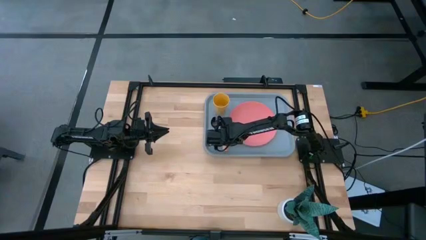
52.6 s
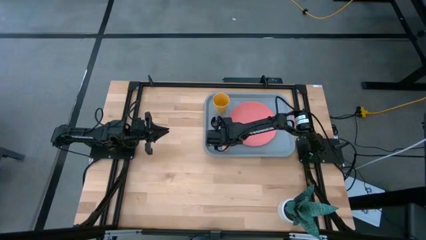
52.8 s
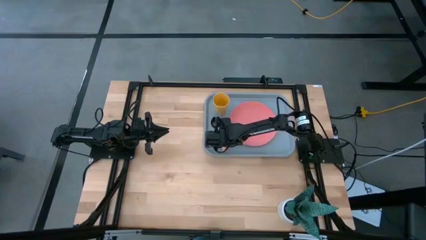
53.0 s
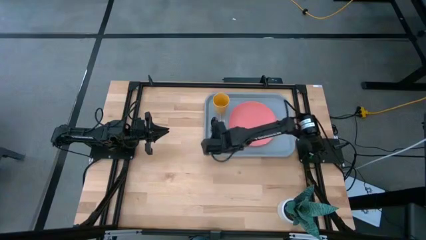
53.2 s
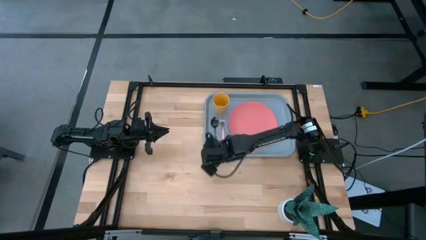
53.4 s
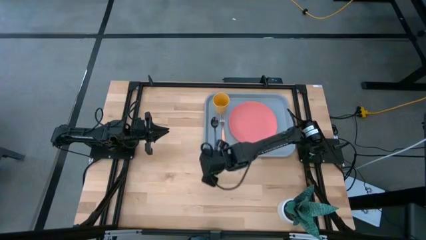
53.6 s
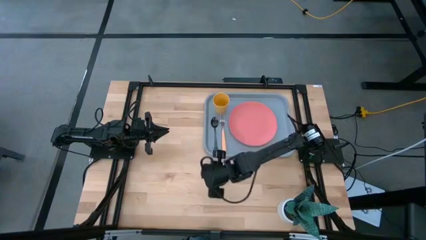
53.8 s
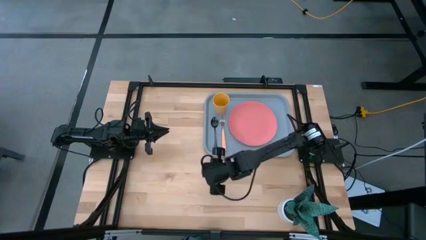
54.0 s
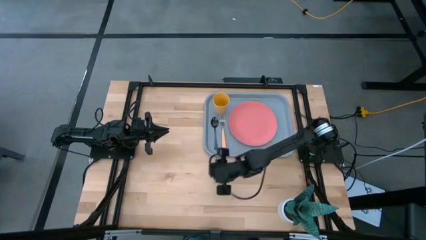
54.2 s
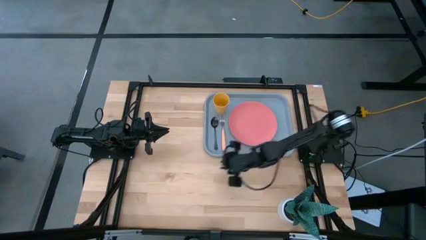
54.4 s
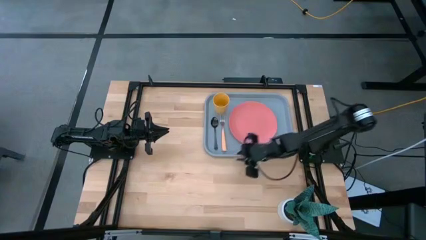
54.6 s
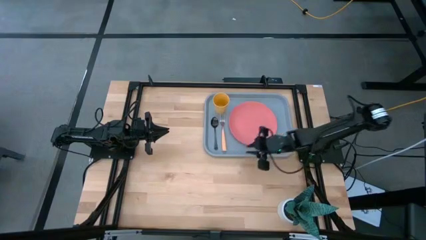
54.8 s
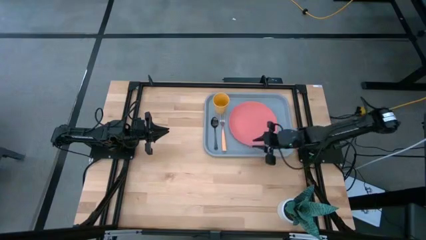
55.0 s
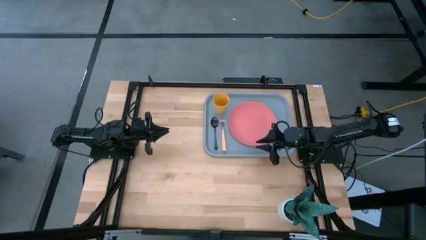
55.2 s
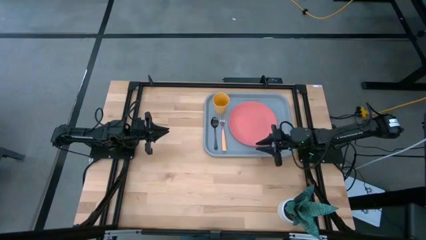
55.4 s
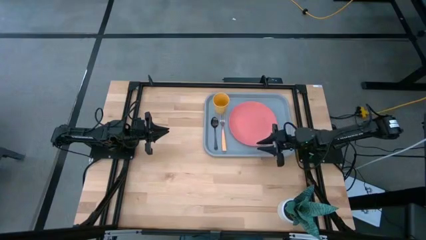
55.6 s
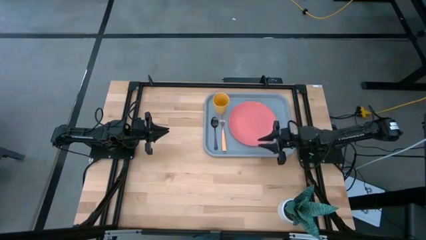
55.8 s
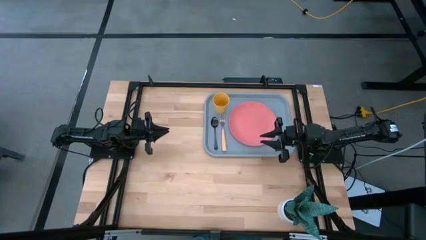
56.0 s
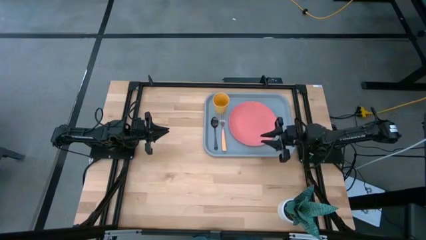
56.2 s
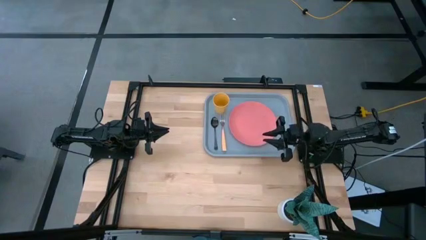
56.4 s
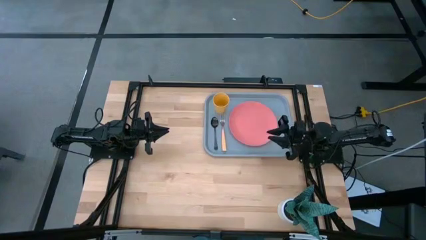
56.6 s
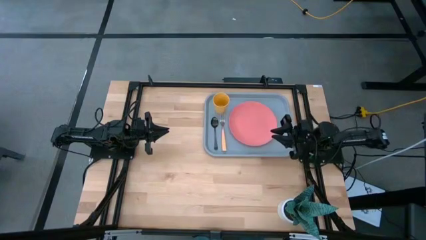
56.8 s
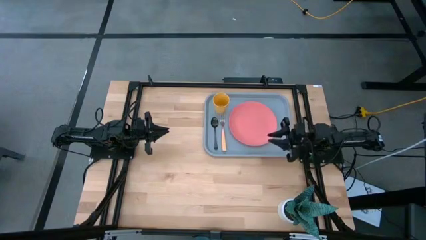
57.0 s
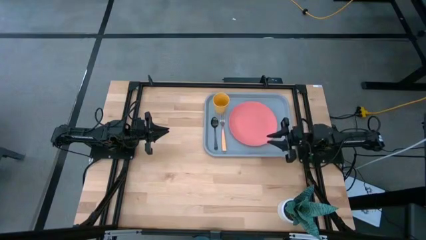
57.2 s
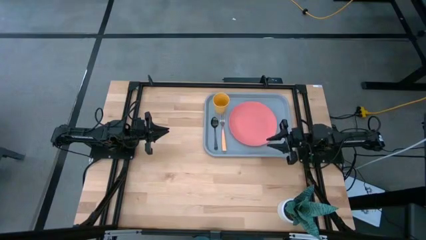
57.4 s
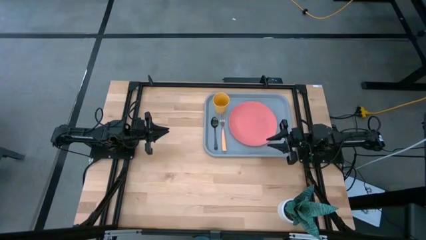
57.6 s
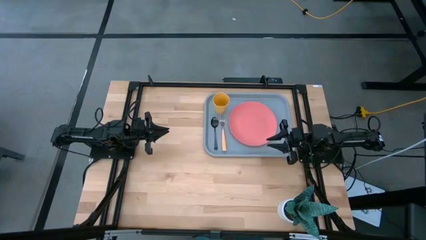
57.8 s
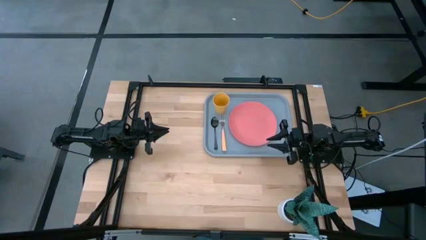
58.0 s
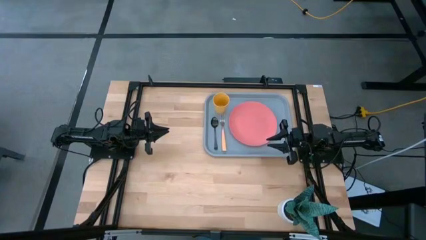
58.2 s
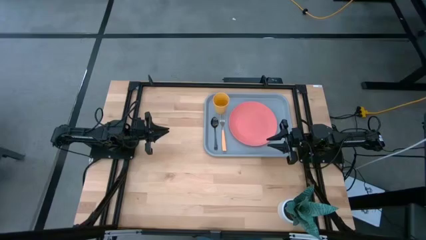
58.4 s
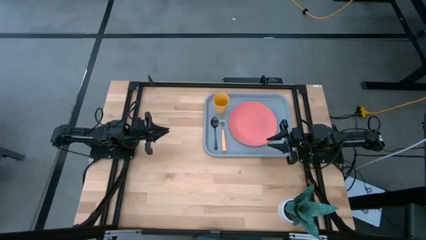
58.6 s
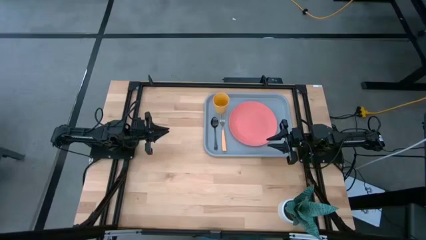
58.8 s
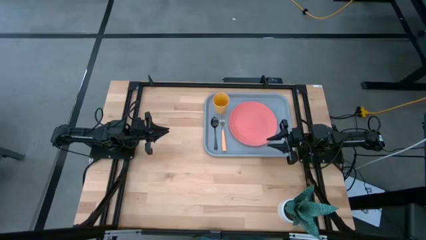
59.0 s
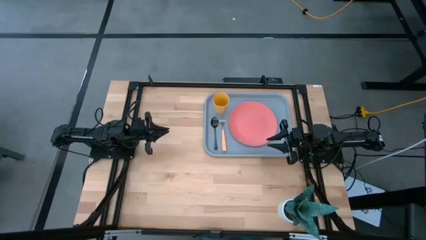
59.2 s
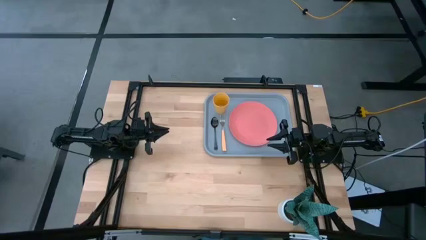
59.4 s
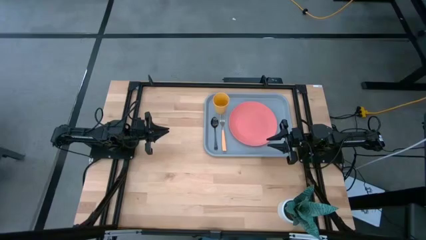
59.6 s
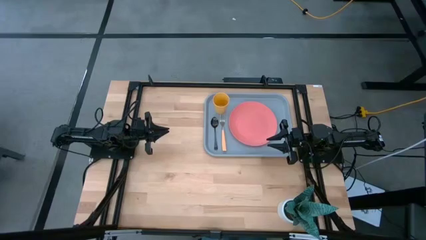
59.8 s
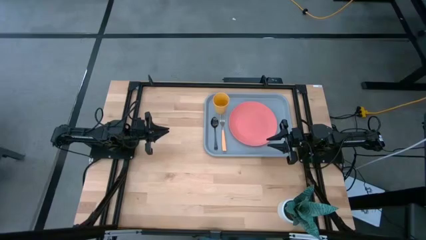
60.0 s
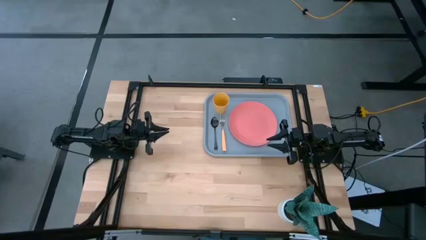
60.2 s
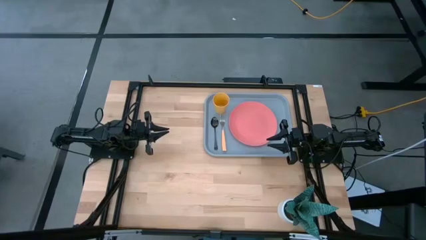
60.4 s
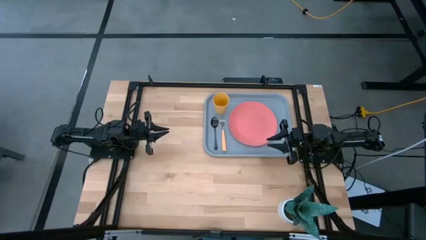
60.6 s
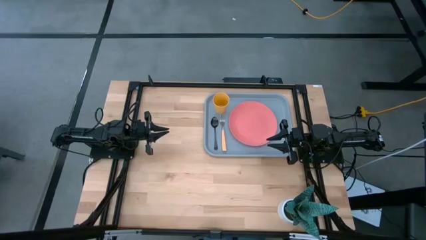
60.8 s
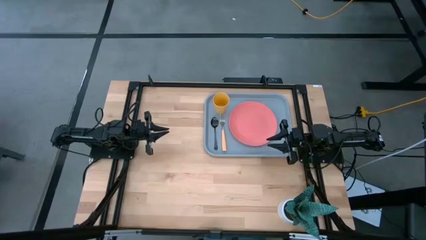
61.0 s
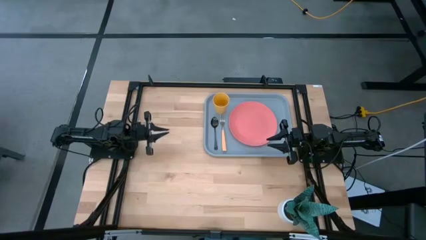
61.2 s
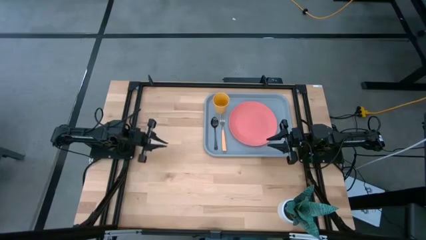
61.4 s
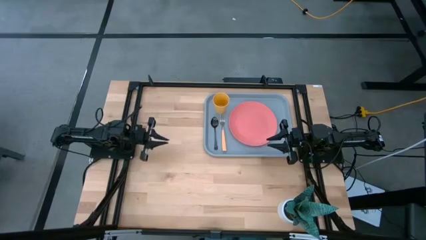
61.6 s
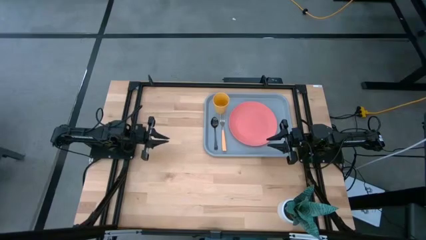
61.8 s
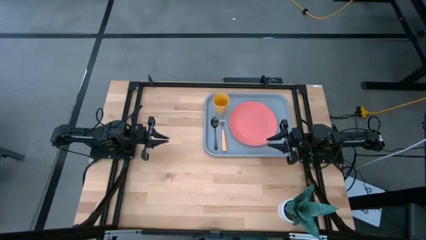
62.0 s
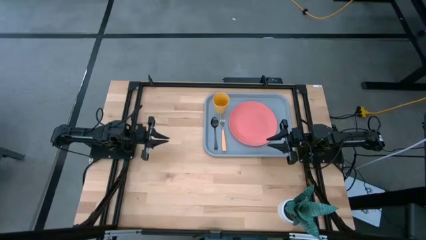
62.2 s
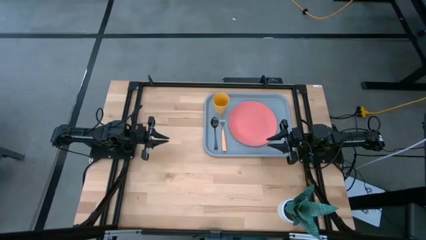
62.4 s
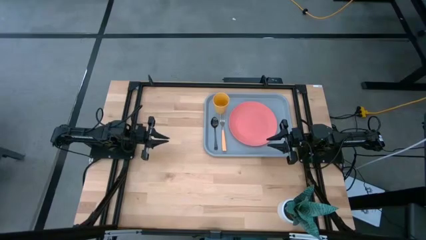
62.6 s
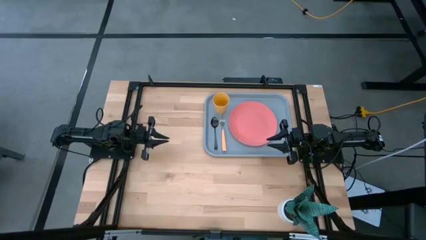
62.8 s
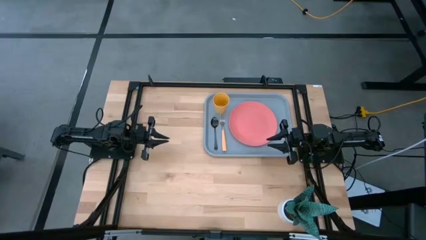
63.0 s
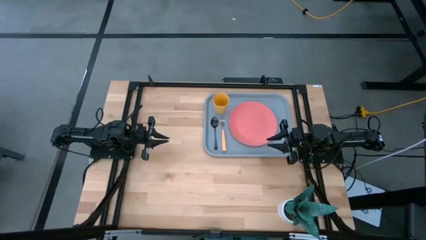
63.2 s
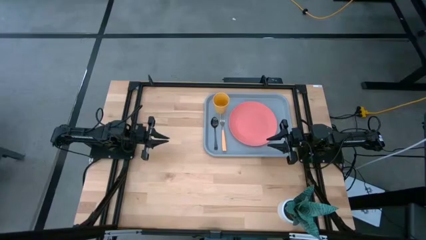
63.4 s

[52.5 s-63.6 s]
Task: Pick and place plate/cup/fork/spoon on tray
Return to Home Position

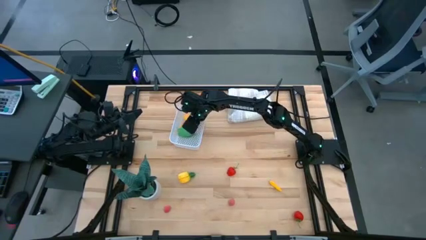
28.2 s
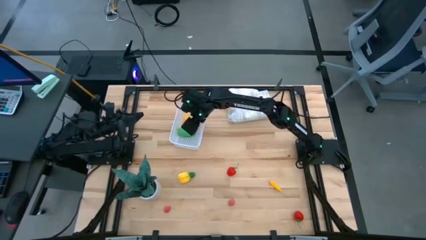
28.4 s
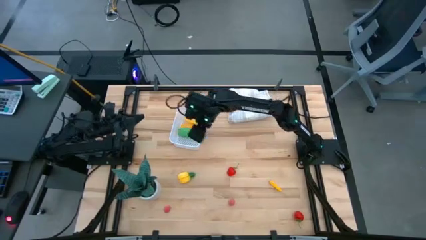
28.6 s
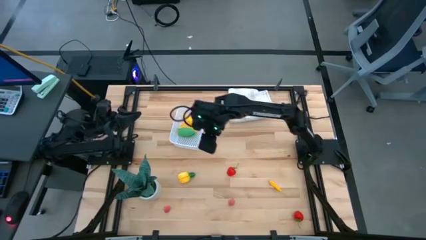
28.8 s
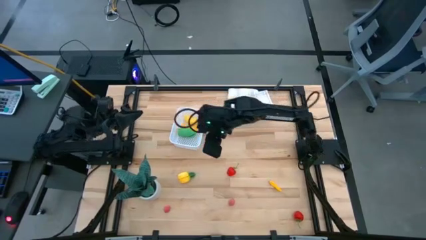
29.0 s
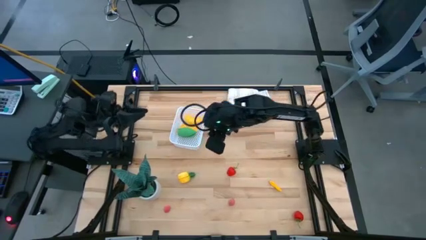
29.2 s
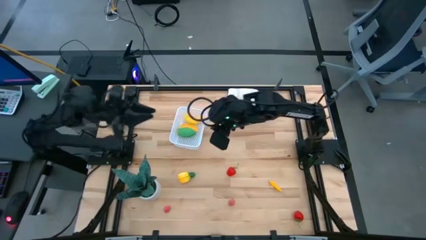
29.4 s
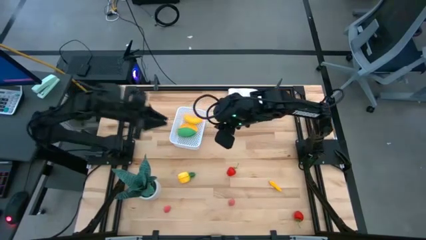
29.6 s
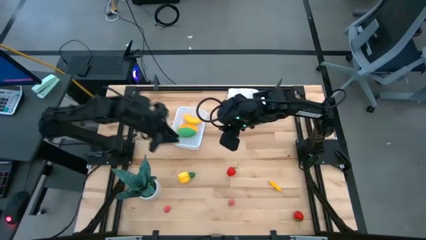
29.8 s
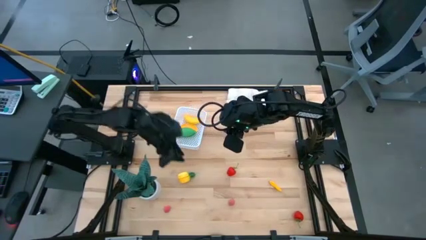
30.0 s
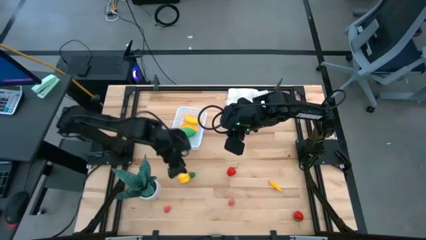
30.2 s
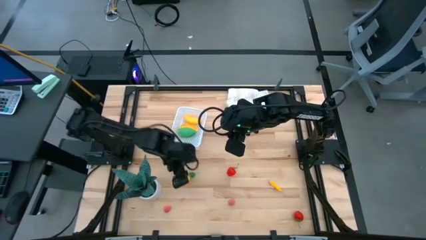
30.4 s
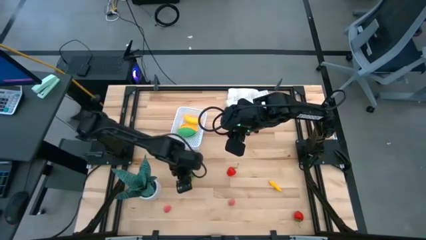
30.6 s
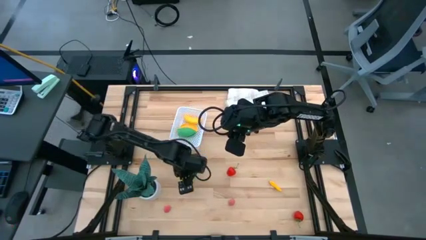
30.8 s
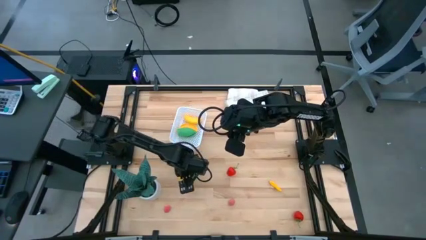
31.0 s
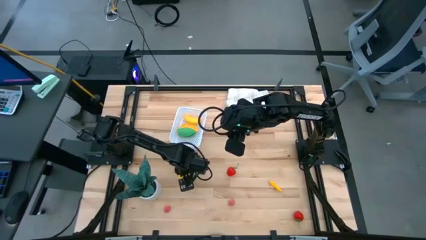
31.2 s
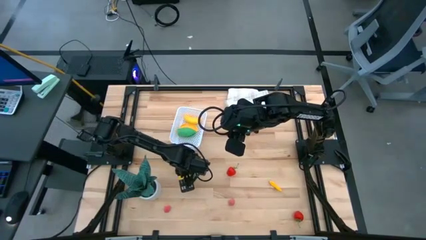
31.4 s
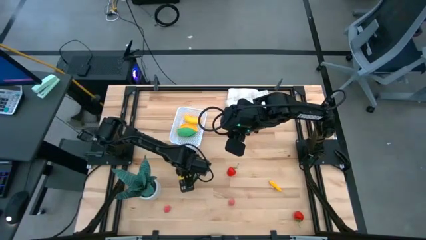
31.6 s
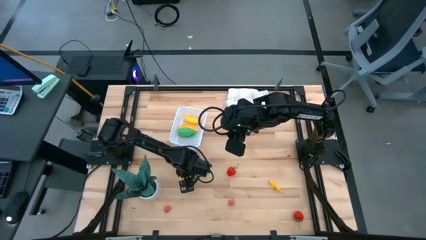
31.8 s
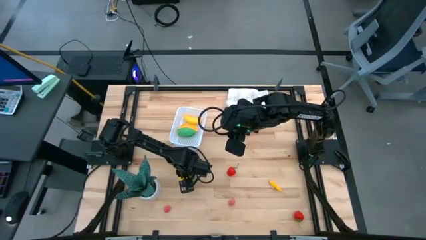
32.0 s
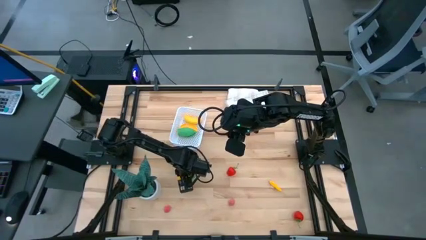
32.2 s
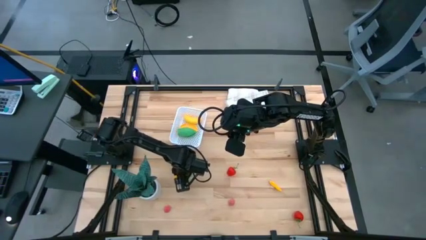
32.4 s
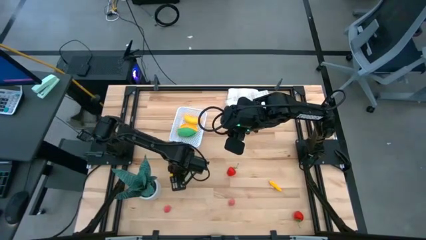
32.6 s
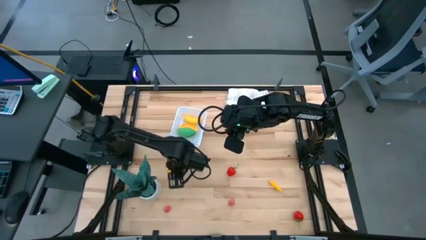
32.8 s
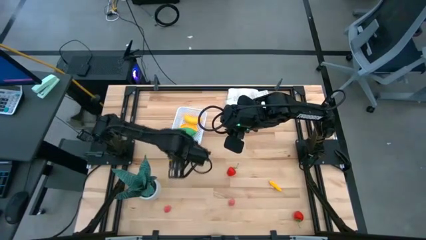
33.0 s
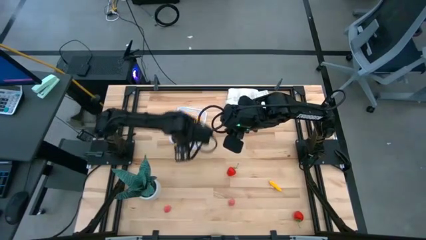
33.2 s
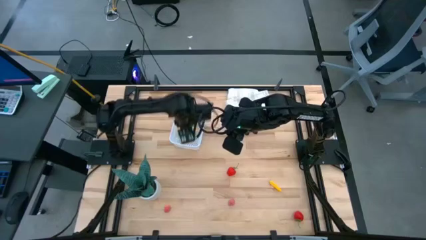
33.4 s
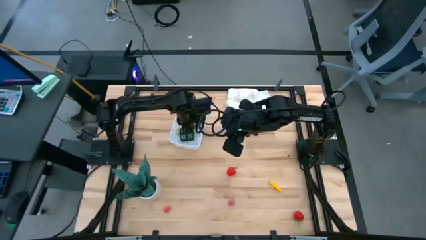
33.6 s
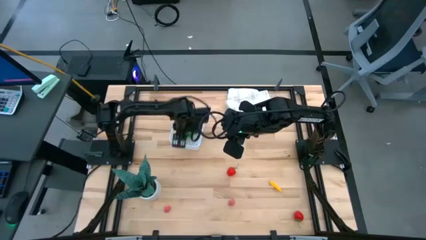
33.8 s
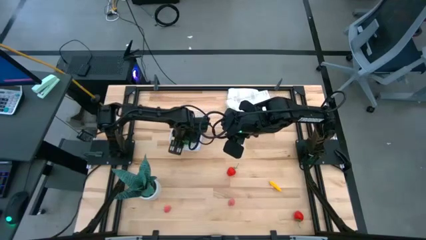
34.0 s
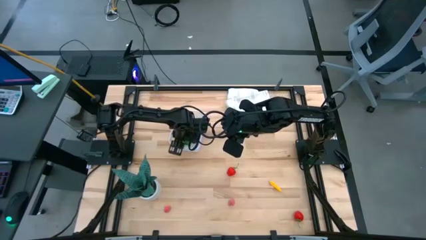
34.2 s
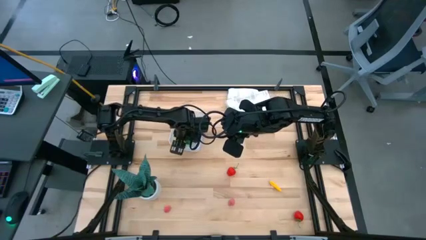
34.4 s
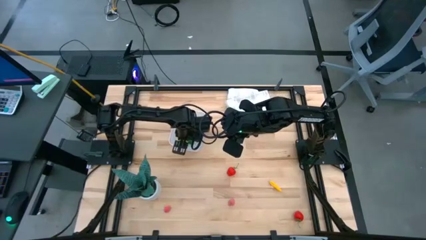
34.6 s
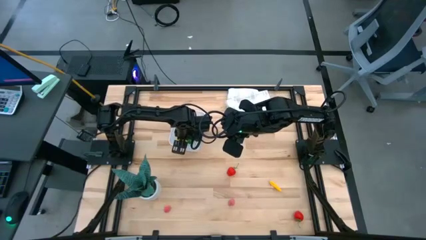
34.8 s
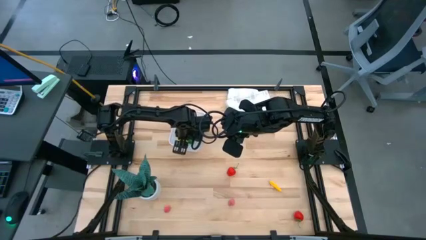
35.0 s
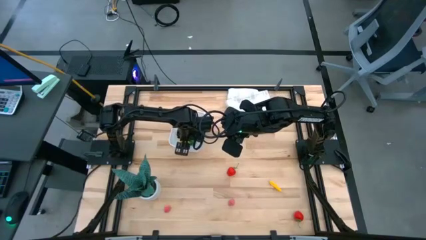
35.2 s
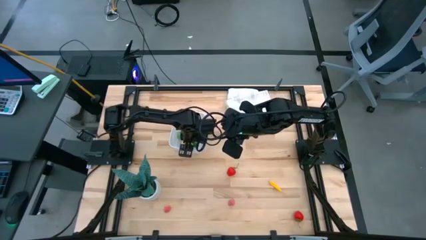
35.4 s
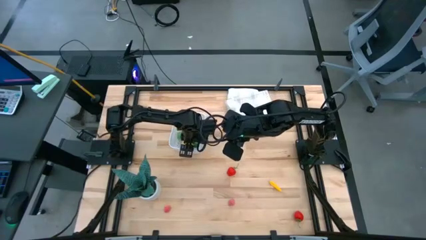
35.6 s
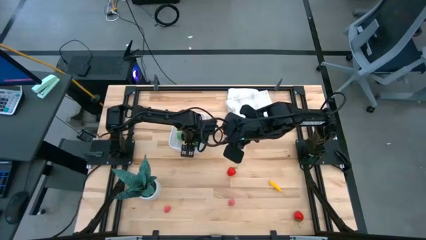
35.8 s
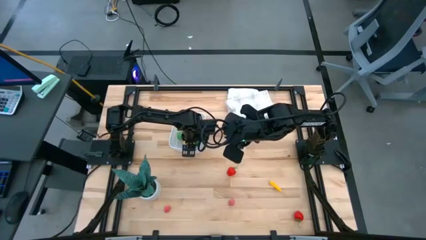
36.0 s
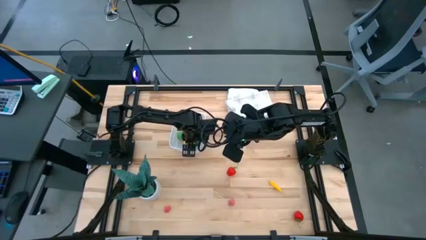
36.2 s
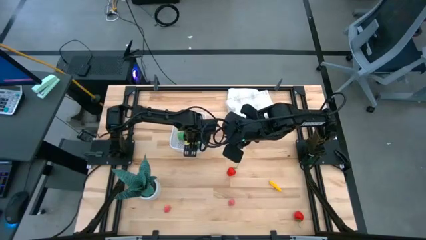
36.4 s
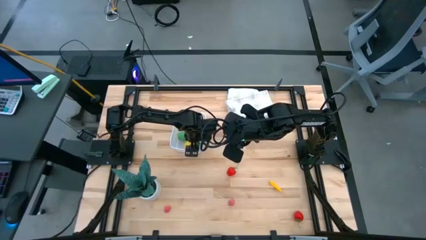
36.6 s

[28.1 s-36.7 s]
Task: Pick and placing Produce into tupperware
Put the pineapple into the white basket
